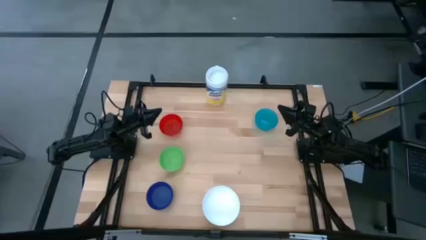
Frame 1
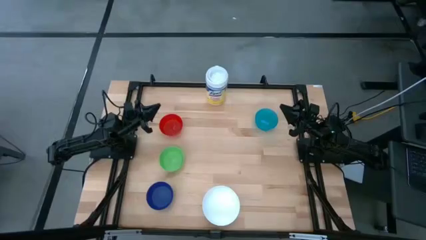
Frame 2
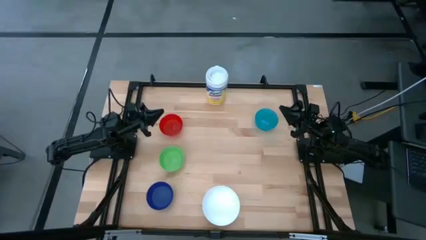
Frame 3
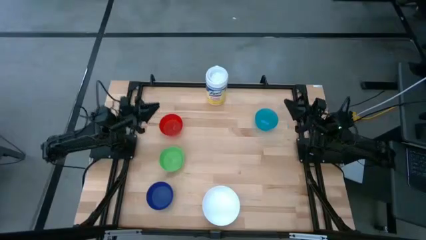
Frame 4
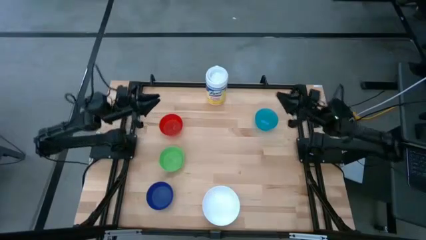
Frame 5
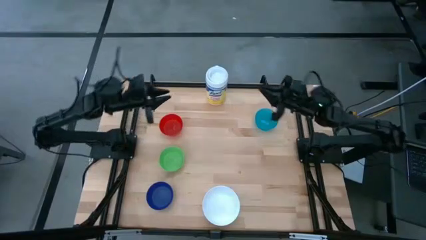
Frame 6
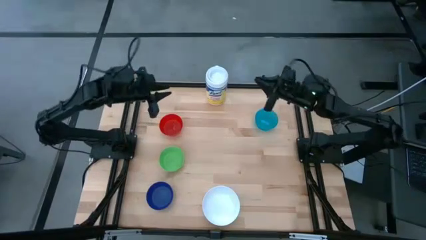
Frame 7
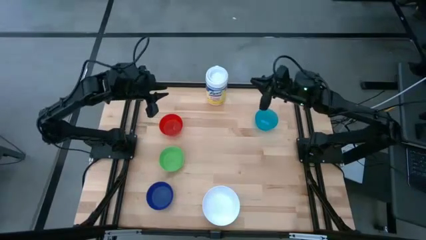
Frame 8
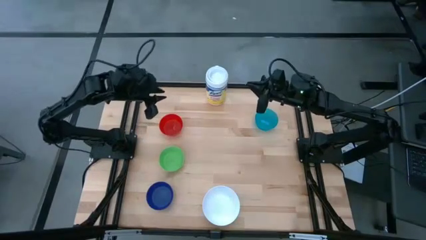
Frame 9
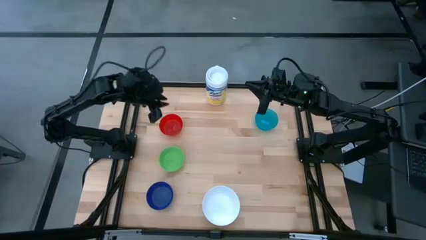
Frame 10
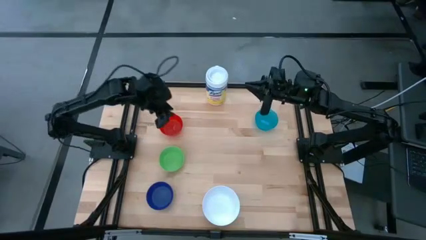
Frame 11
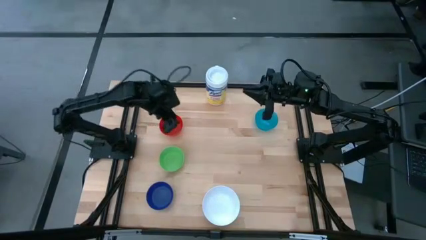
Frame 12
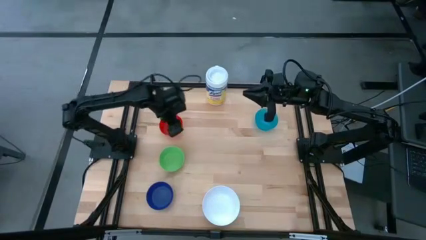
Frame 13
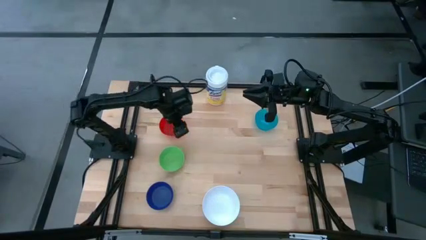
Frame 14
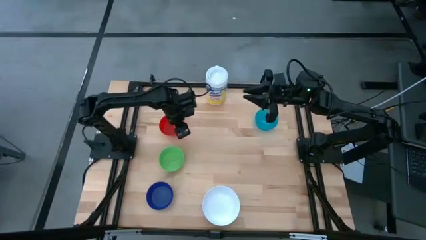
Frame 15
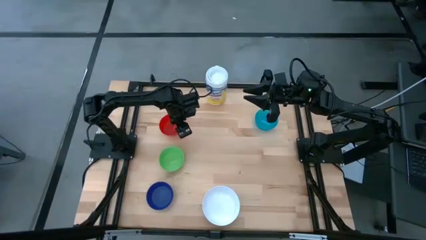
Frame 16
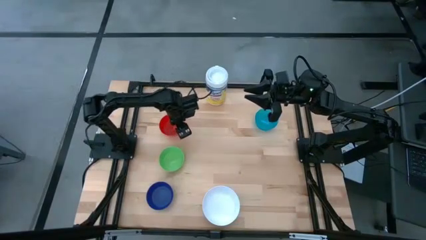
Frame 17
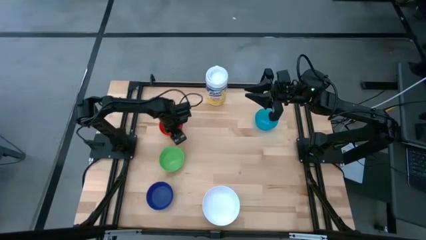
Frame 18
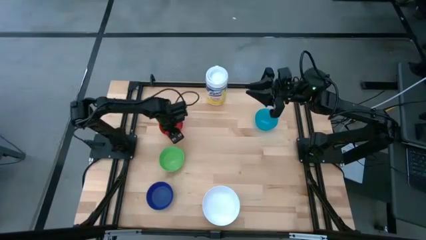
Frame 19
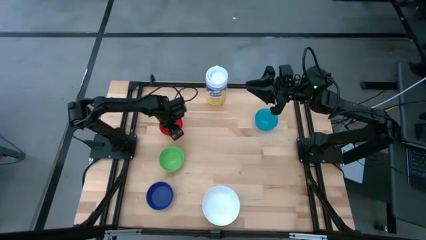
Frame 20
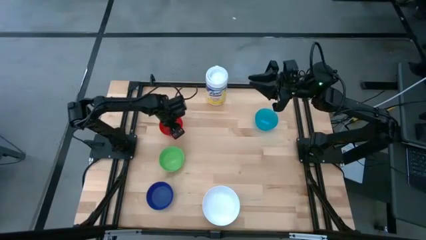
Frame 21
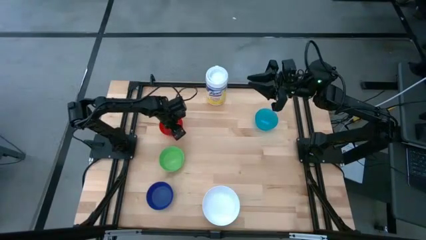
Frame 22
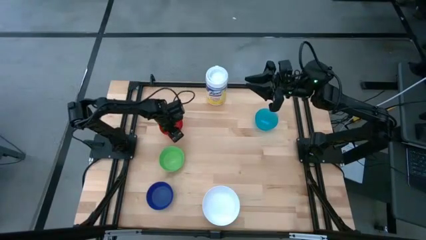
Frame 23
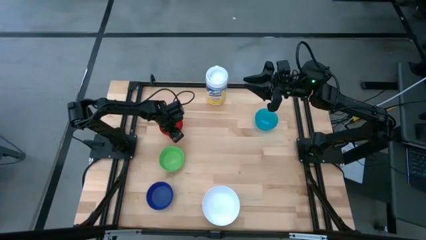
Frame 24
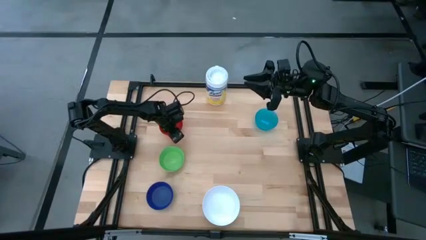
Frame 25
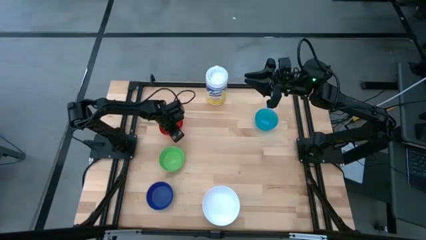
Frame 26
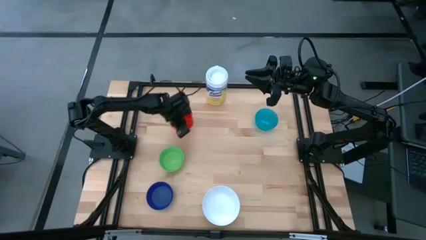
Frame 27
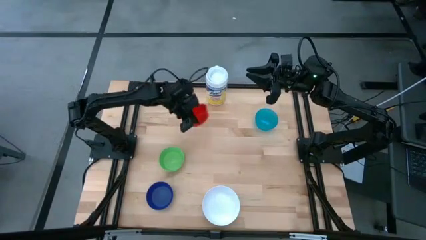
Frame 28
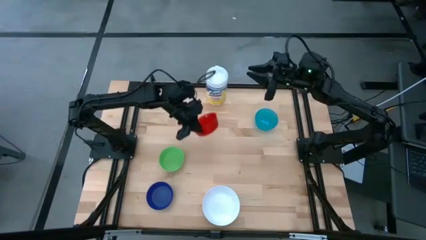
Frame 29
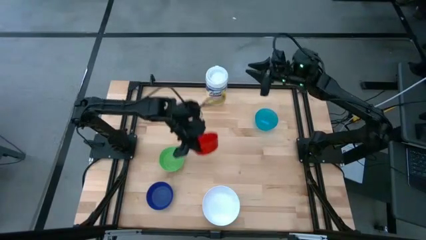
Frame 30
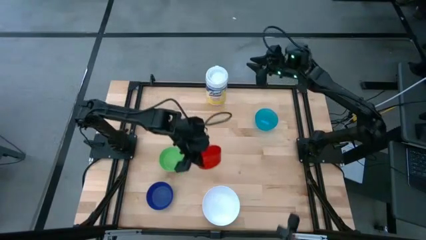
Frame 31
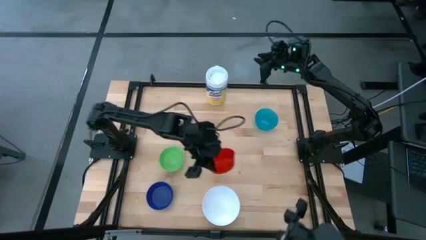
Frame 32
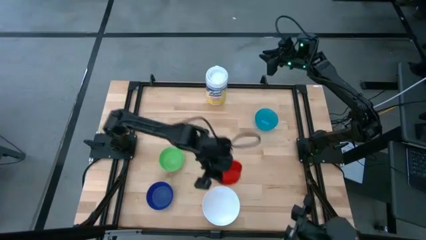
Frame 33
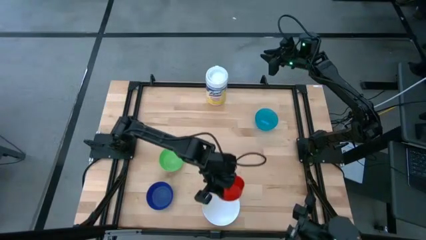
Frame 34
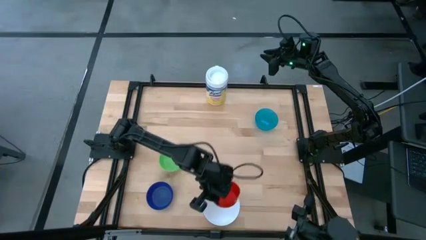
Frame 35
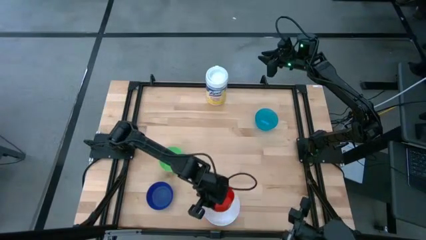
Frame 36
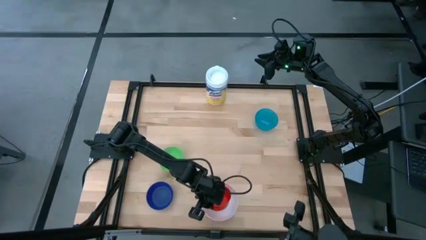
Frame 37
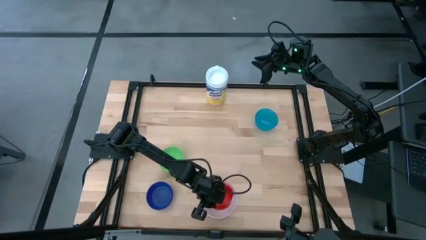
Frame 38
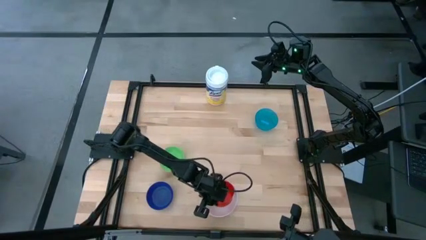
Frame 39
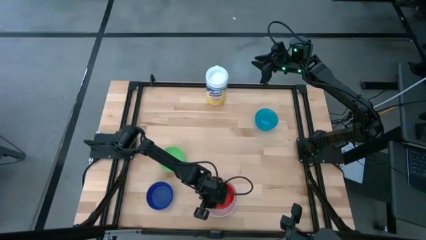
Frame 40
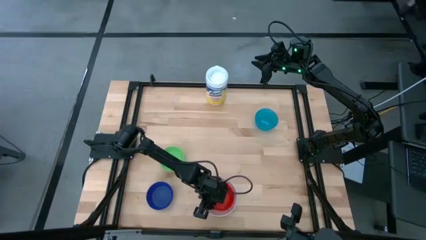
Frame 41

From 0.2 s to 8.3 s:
Stack the red bowl on top of the white bowl

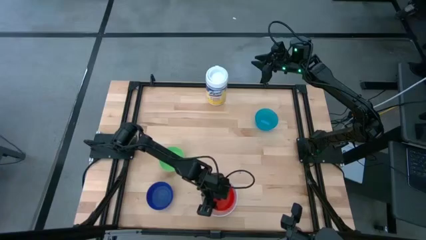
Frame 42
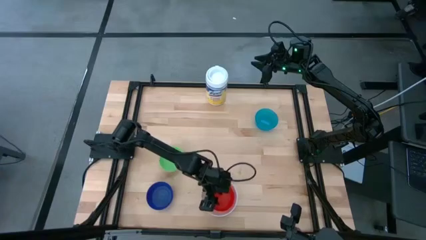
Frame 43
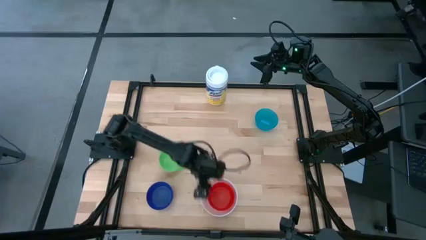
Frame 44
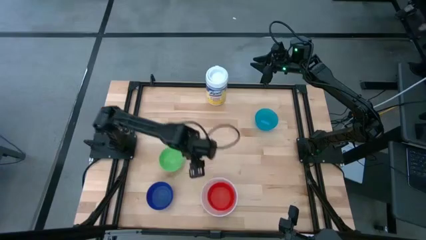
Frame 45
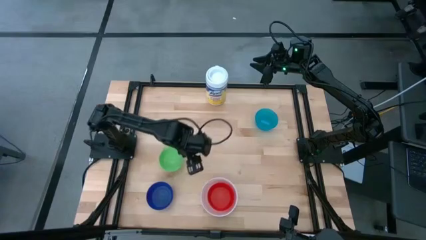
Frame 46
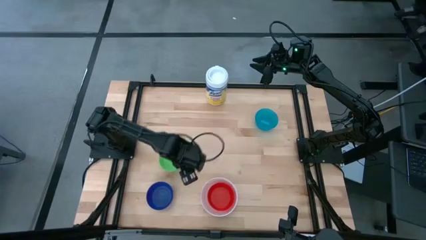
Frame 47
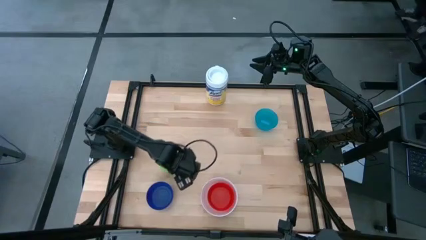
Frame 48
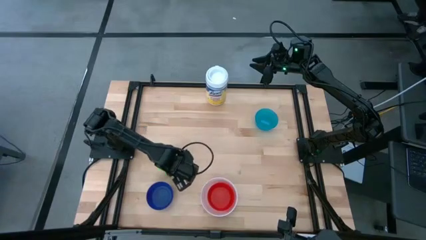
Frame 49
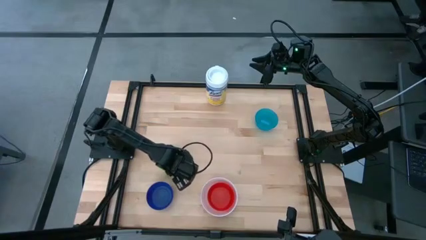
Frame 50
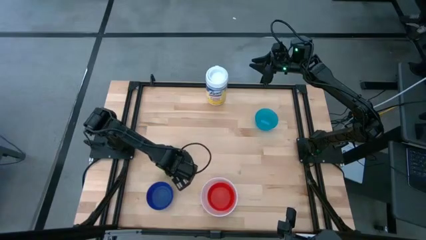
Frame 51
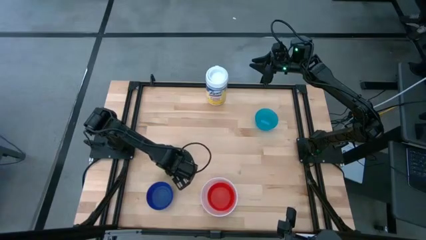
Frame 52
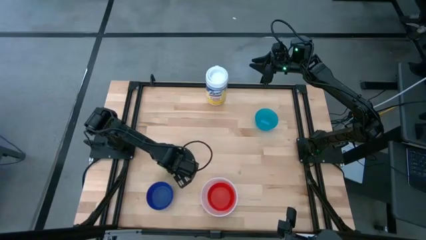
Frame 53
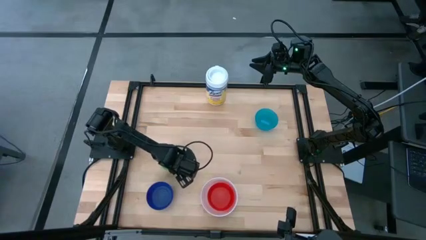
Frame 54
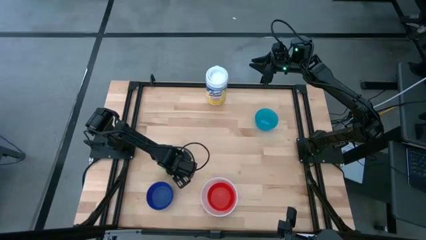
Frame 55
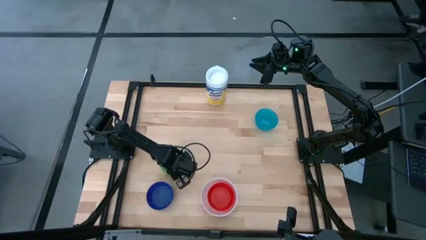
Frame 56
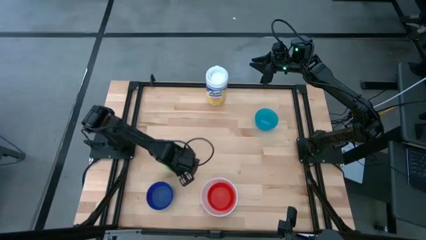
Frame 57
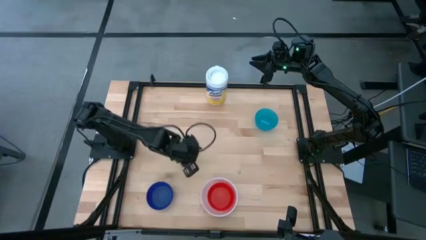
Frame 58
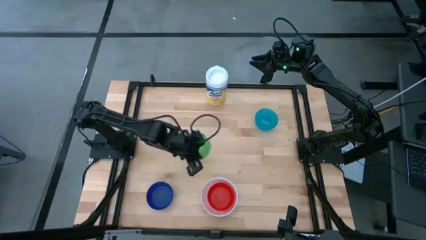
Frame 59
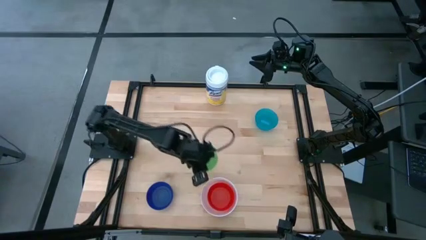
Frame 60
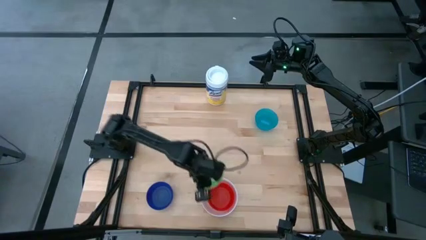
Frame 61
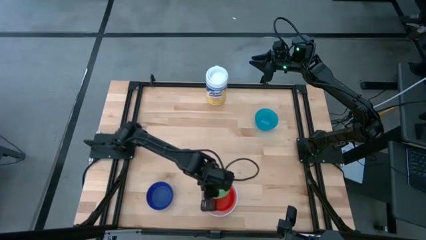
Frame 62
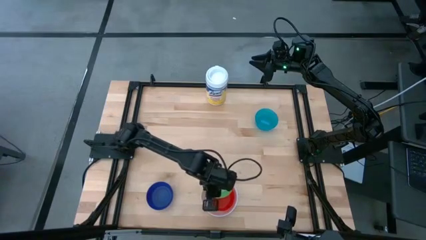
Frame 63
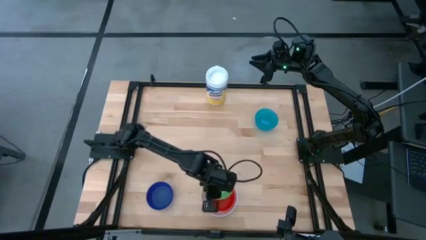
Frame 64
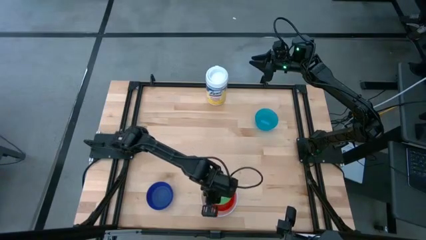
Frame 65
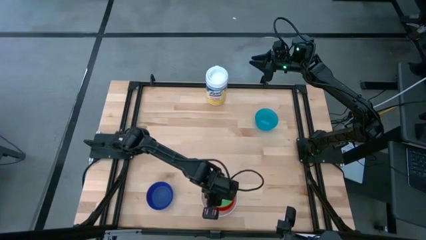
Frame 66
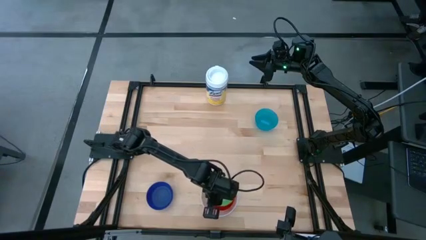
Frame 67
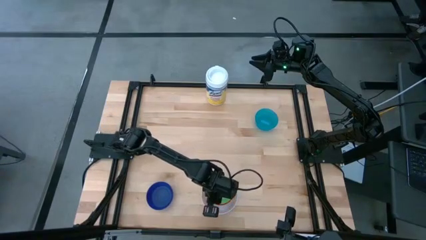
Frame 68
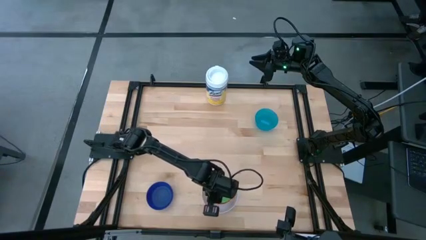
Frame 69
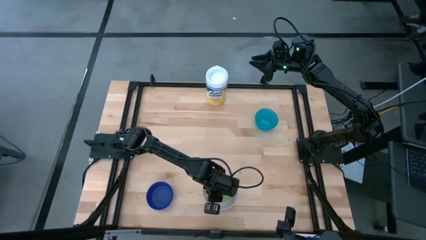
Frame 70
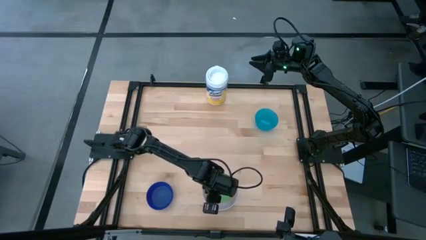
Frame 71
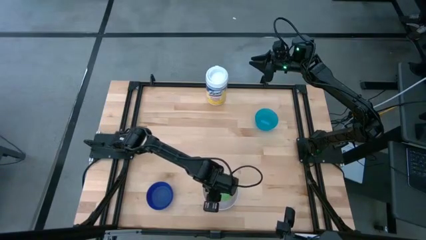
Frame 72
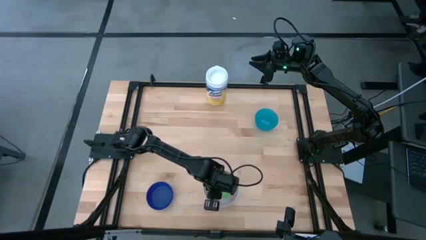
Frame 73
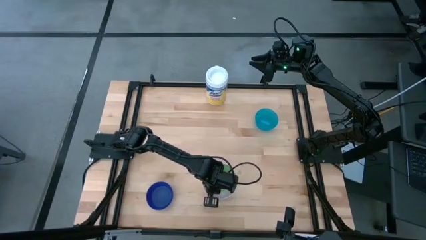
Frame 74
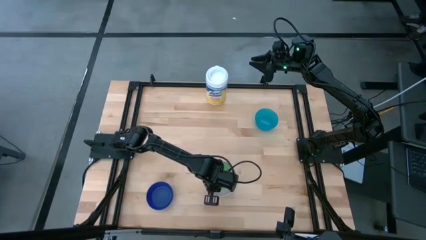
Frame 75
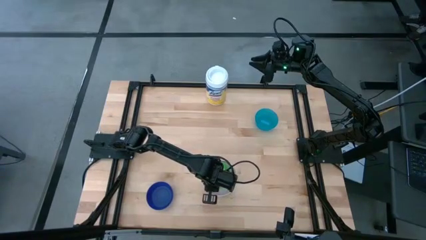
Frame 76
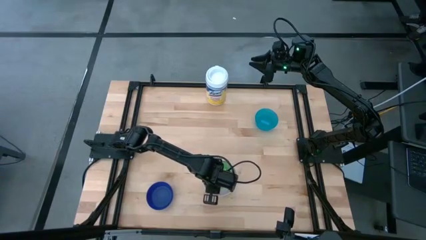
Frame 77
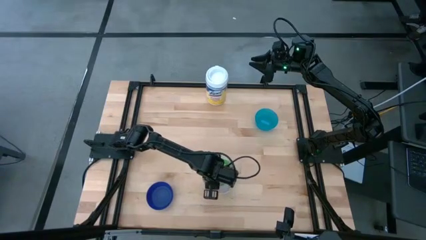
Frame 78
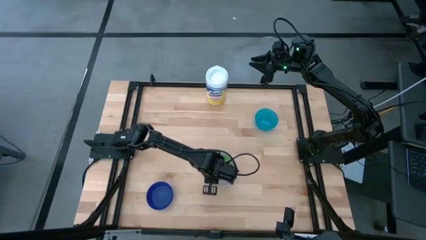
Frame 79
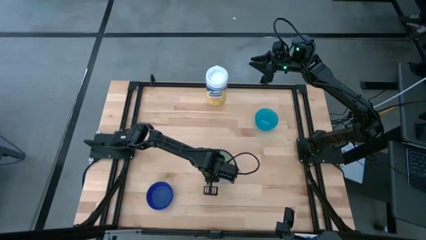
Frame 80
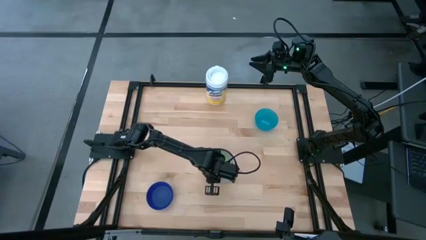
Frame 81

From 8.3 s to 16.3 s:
Stack the green bowl on top of the red bowl
